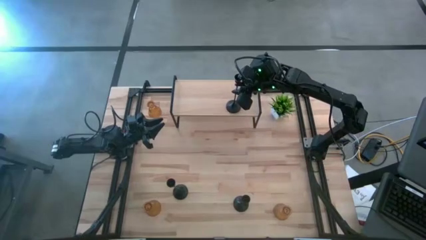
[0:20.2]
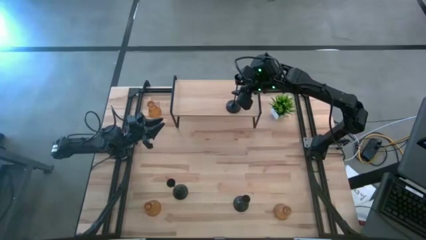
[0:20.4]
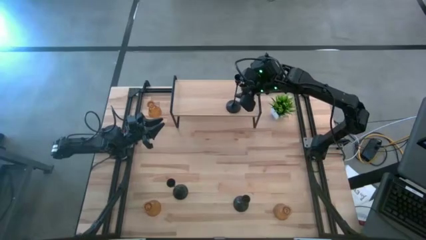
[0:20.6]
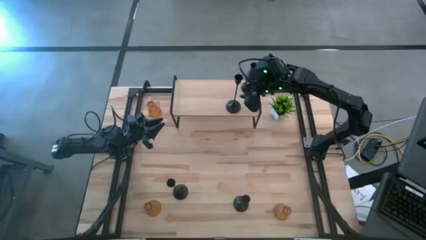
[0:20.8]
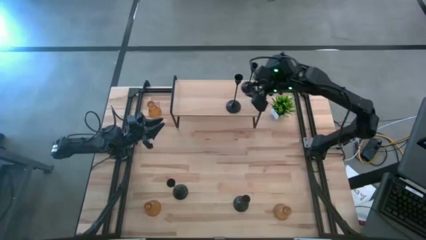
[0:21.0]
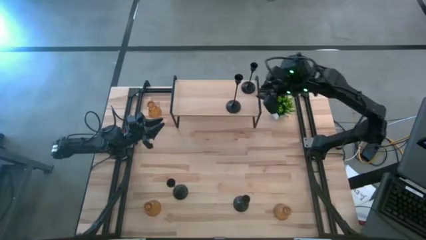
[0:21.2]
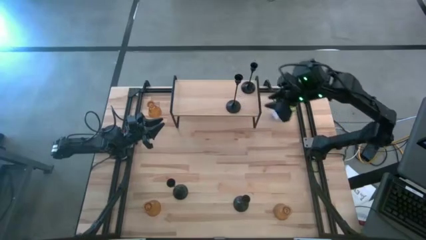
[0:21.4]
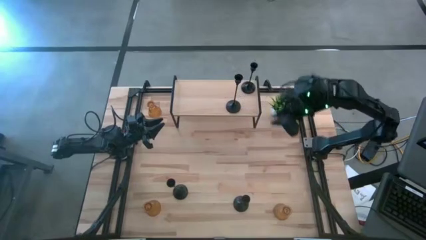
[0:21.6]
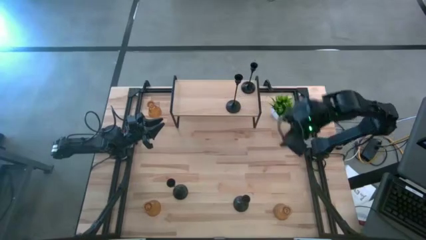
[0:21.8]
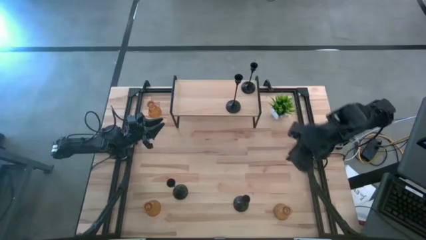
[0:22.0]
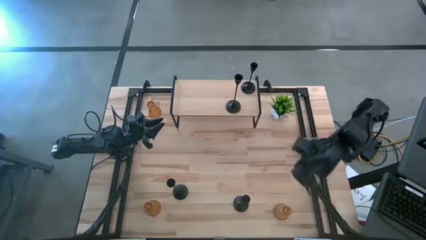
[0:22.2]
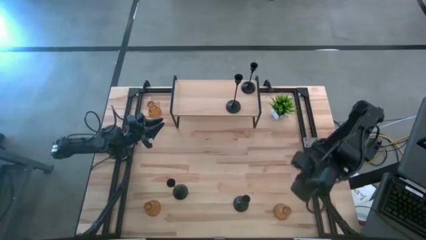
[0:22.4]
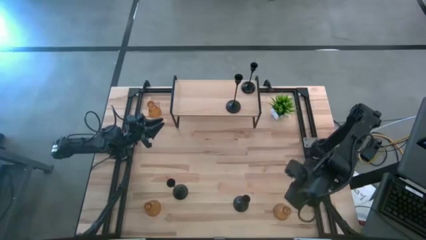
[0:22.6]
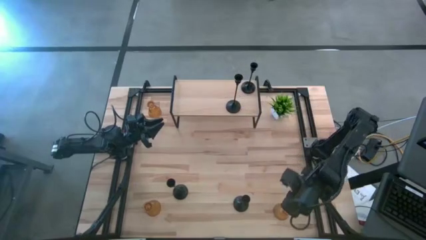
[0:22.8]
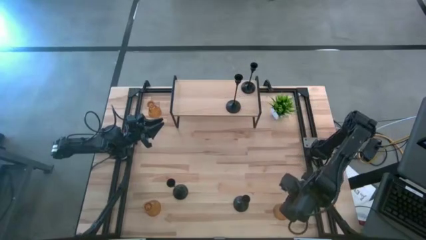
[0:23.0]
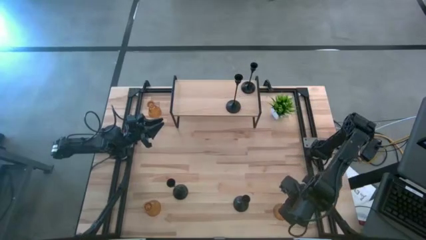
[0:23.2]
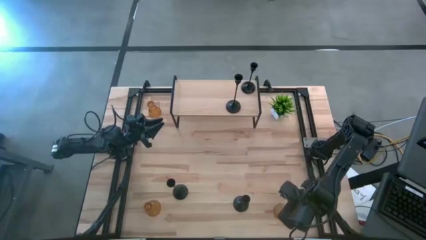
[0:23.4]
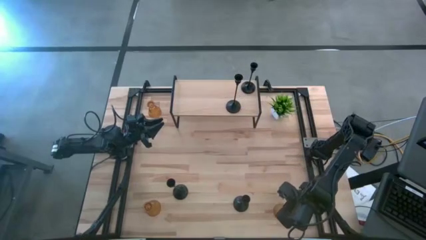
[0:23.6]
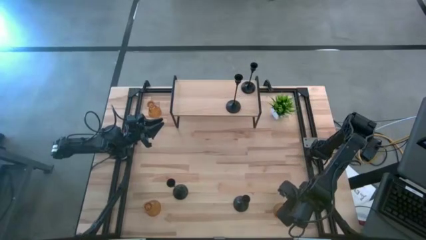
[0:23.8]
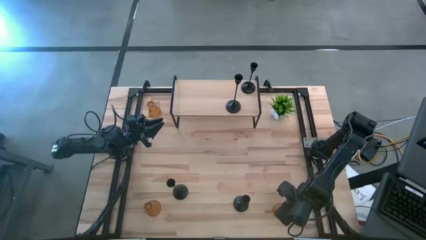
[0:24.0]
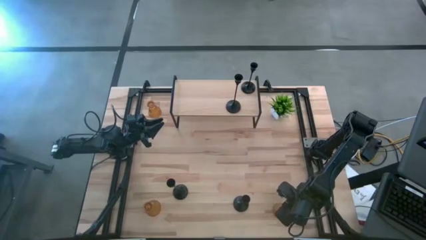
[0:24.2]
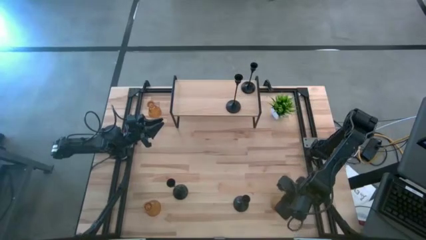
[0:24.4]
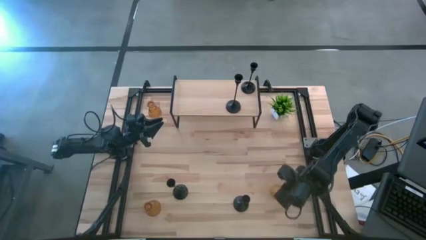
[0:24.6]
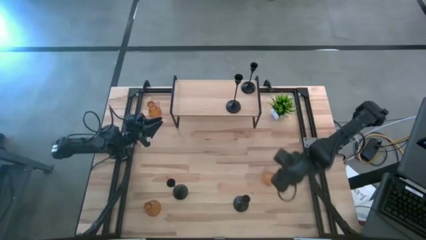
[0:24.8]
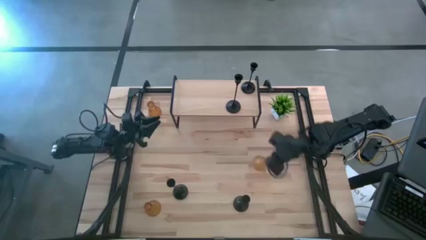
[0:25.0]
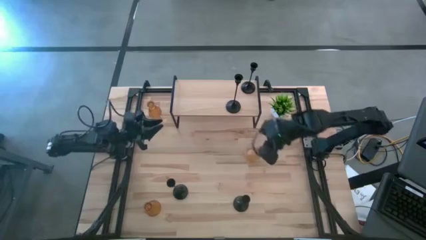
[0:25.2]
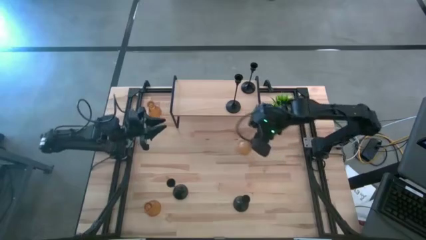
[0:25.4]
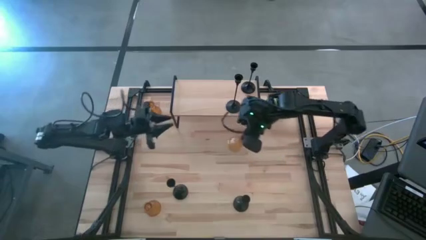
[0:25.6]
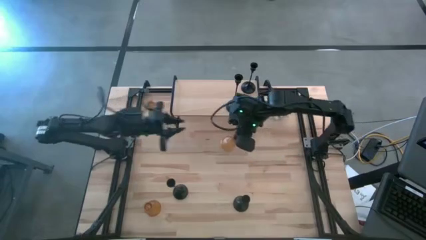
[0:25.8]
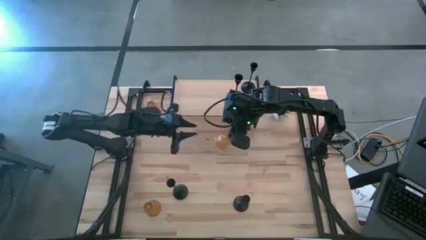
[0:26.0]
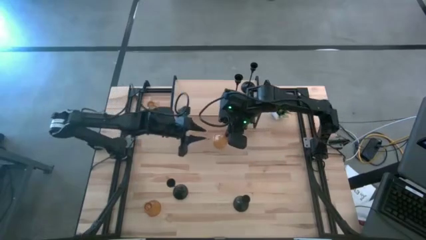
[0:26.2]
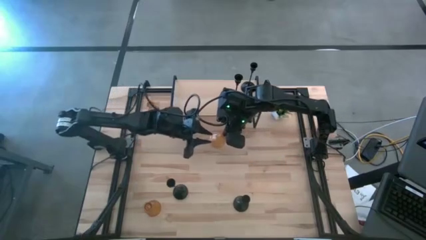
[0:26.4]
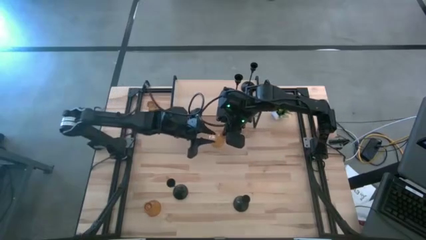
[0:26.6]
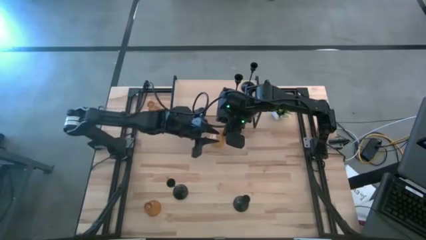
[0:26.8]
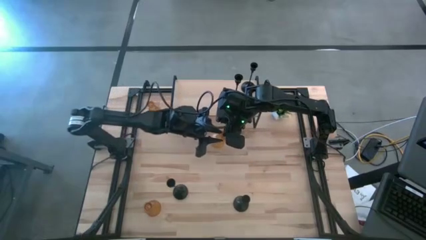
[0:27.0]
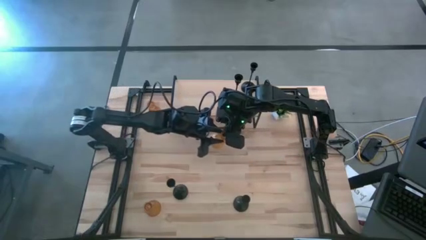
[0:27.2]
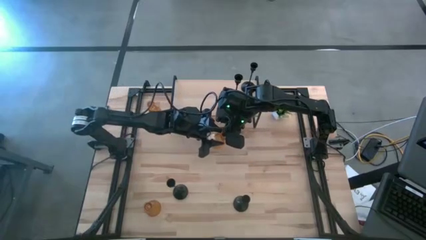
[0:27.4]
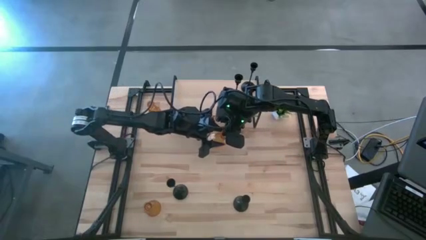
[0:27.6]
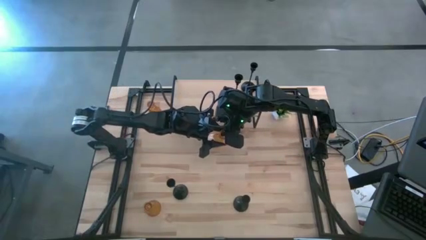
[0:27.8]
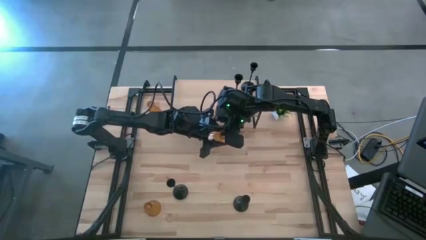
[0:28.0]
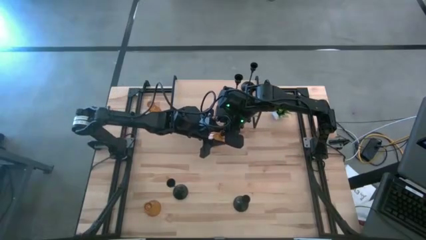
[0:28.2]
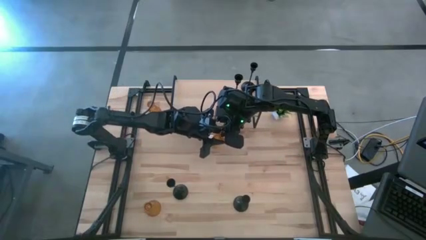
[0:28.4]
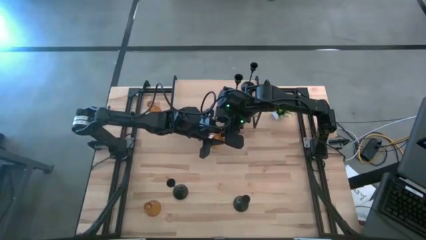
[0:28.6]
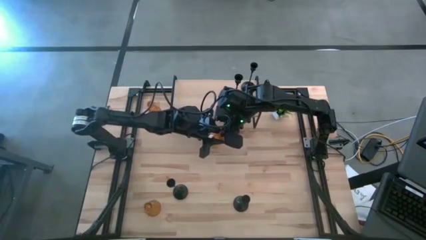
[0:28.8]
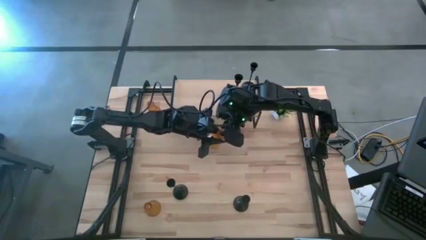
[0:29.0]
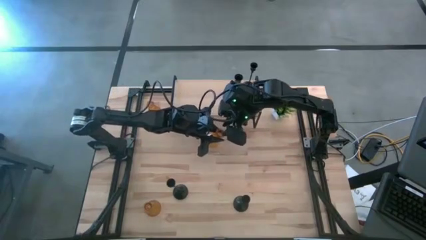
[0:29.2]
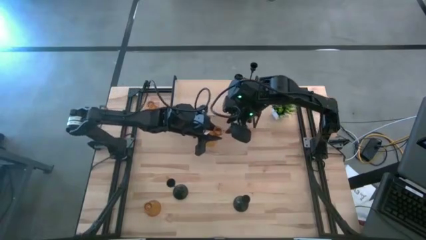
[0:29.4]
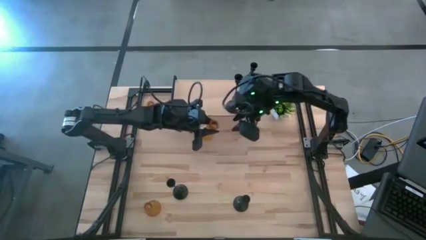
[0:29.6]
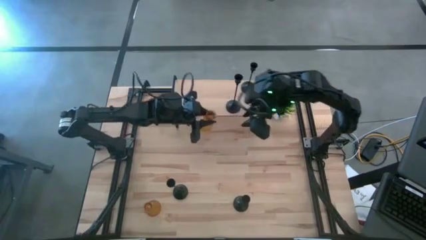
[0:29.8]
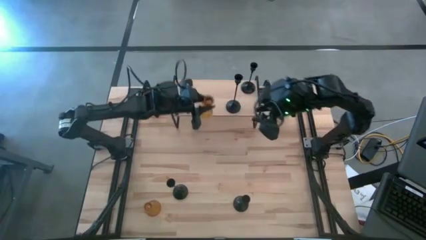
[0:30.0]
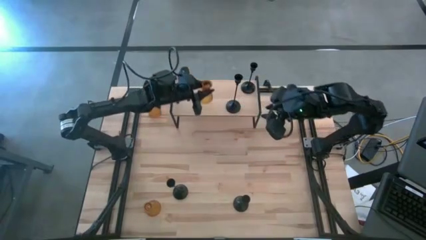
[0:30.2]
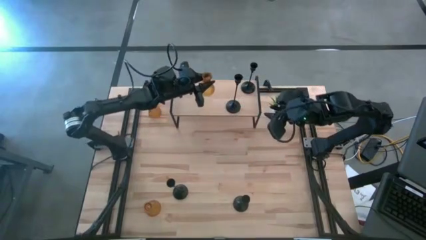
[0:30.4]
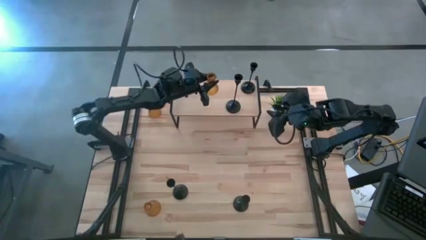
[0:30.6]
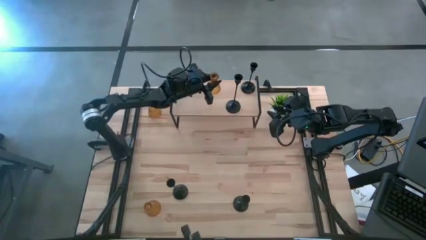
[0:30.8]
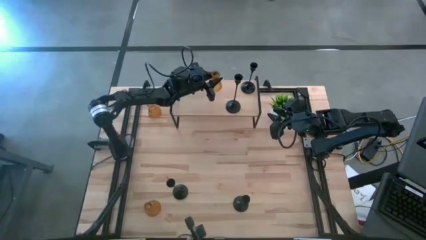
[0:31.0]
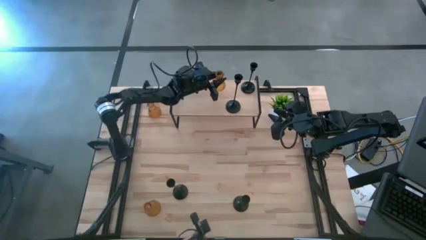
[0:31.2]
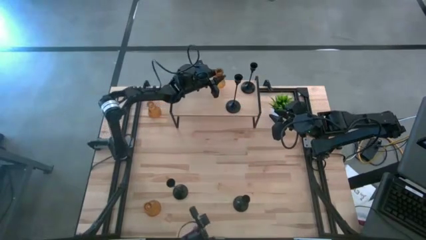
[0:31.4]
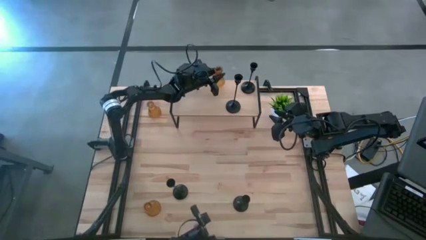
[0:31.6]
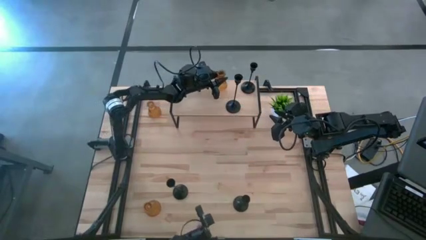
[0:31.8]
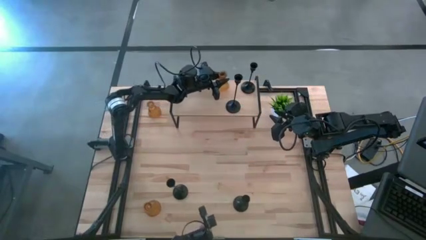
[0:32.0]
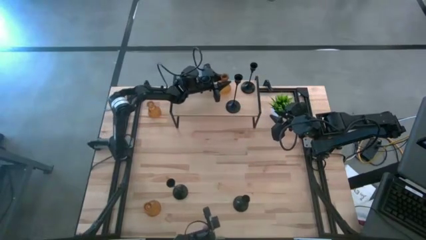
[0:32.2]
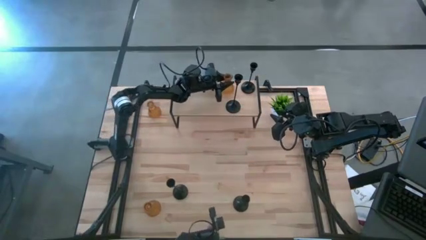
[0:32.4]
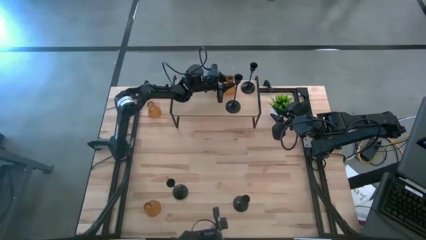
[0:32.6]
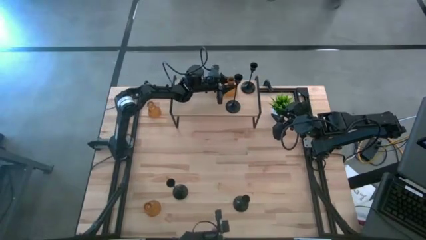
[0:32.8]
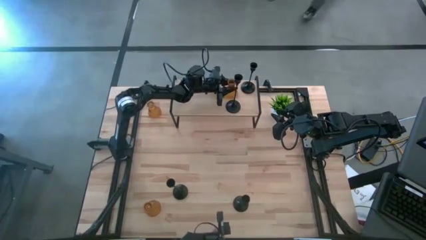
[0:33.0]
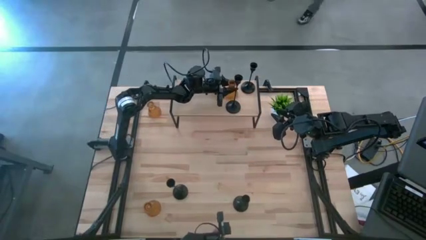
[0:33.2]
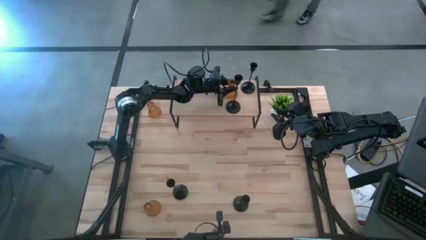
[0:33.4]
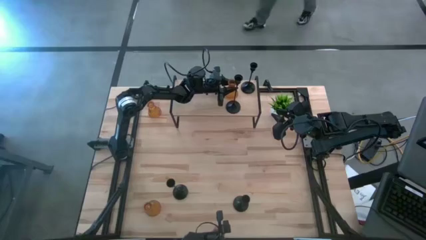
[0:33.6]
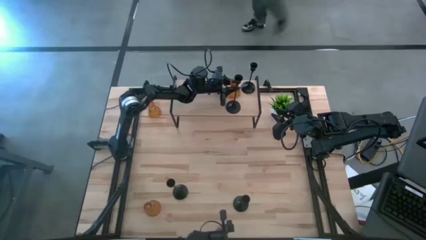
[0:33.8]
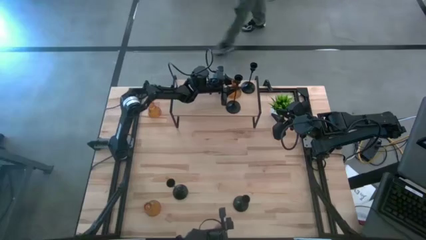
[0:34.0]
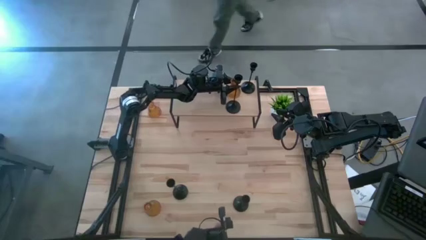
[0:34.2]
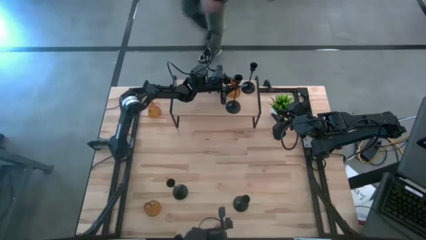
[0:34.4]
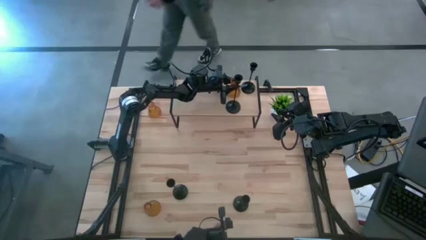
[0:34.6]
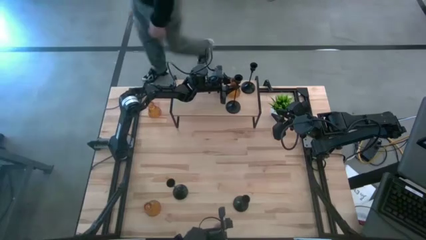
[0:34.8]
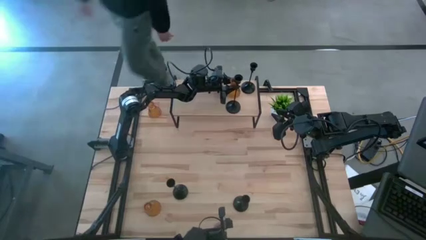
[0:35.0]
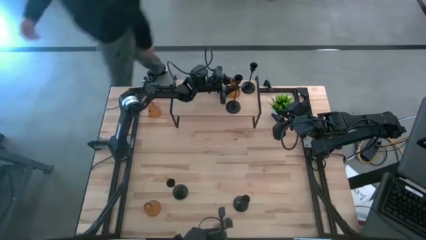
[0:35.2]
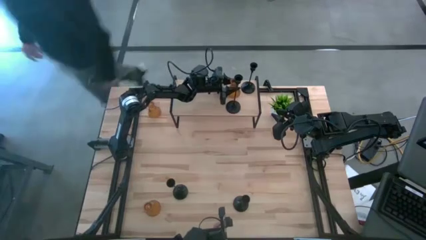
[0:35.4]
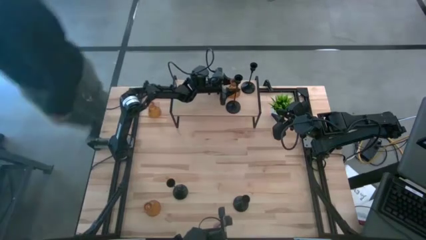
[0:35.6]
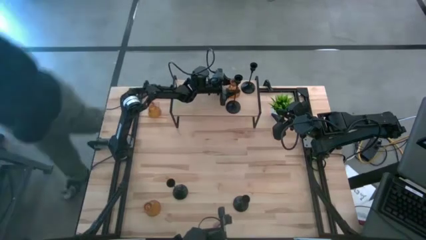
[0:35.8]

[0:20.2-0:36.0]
Task: Pick & Place candle stick holders
Put the bottom right yellow glass candle holder on the shelf
